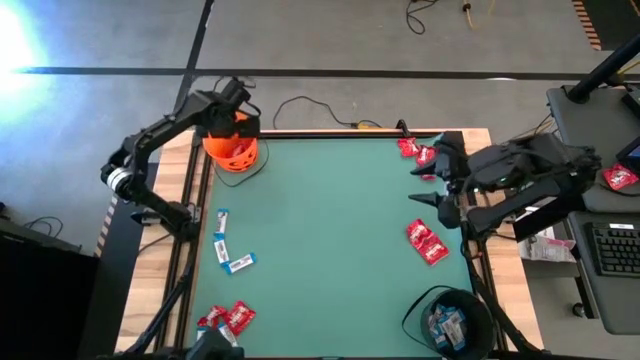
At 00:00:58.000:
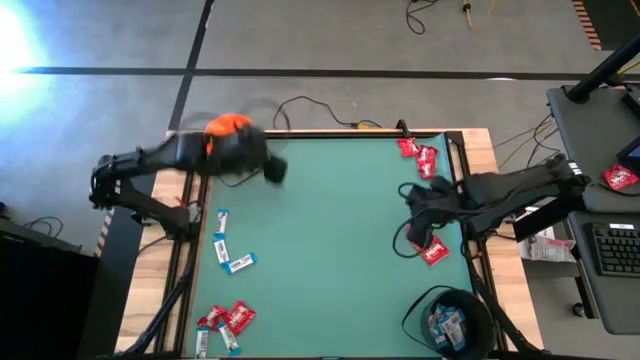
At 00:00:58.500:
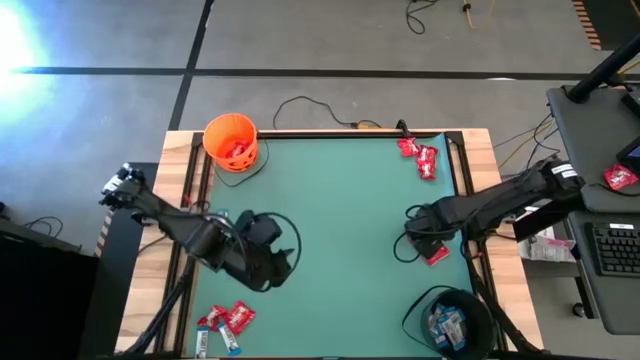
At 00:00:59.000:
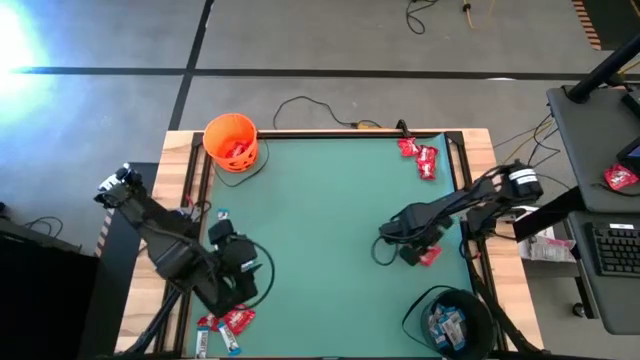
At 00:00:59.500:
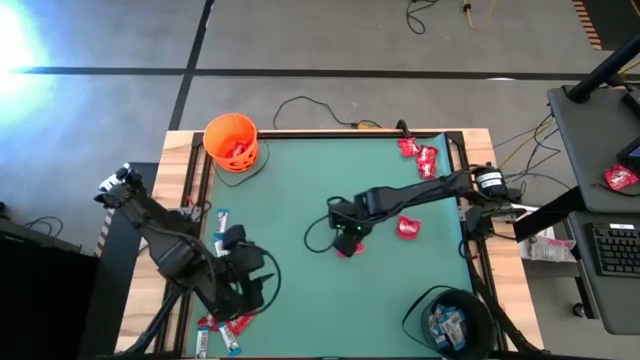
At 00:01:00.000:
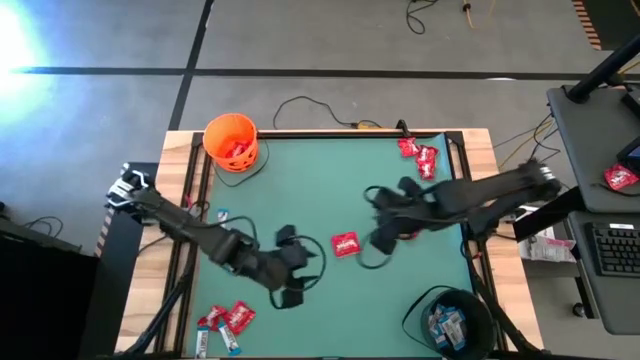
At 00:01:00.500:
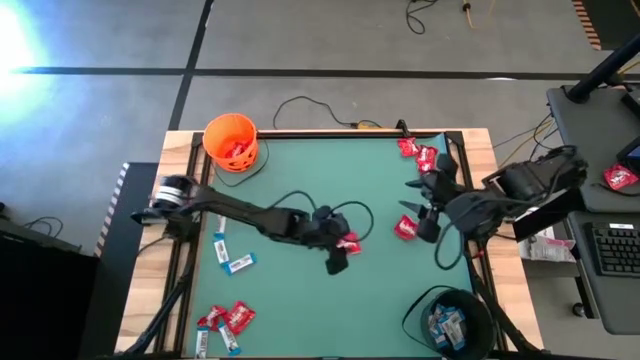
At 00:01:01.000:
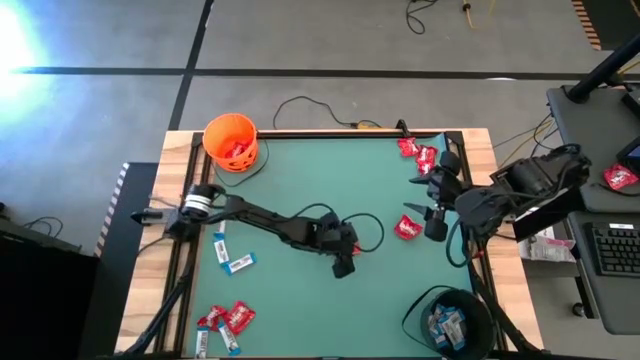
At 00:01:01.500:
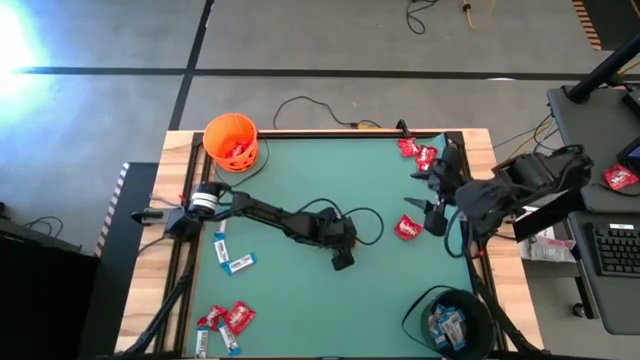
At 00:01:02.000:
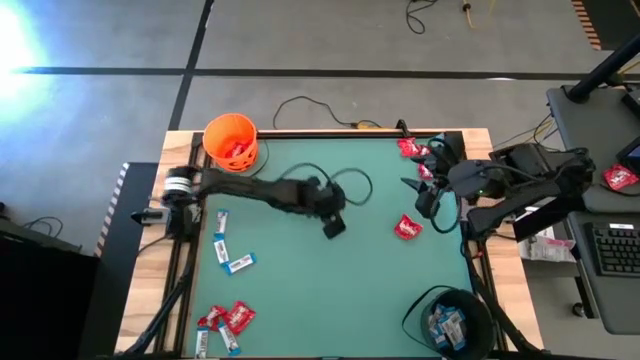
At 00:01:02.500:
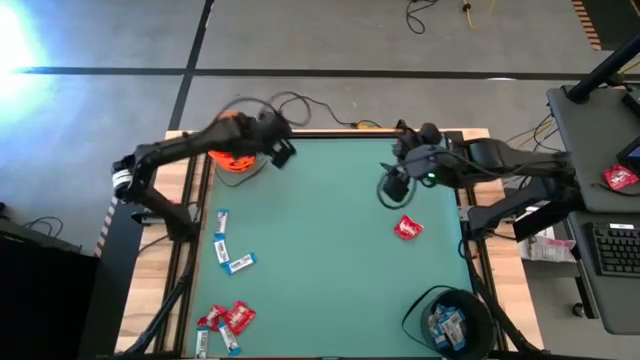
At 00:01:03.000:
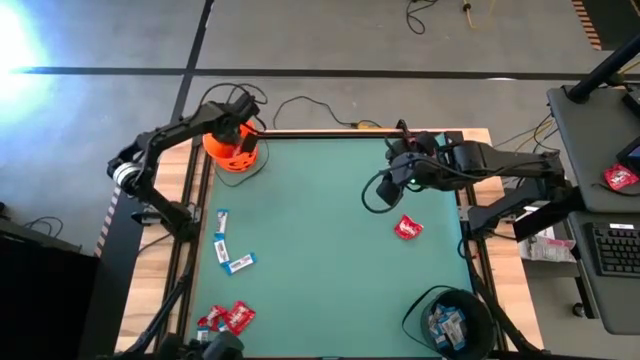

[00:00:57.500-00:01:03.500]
Task: Sort candy by brand, put in halloween buckets
Put the red candy into the orange bucket

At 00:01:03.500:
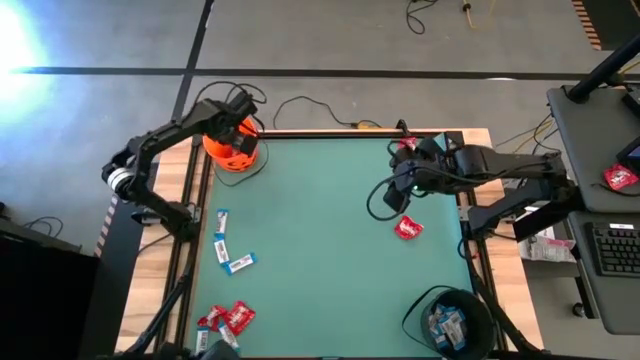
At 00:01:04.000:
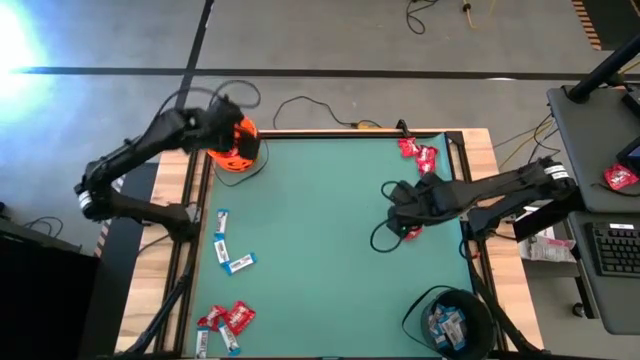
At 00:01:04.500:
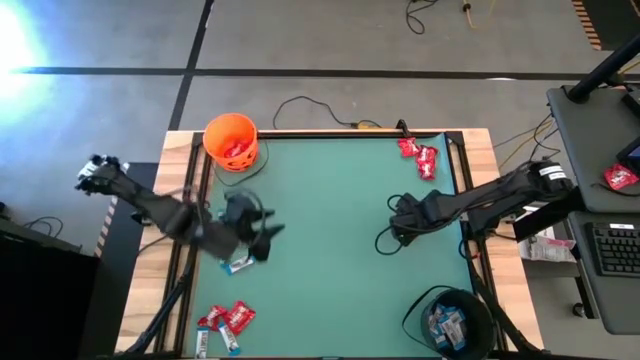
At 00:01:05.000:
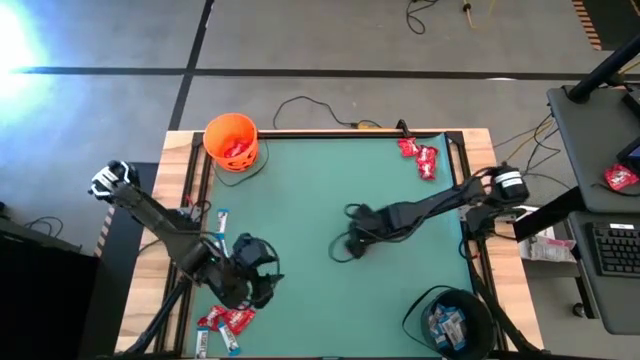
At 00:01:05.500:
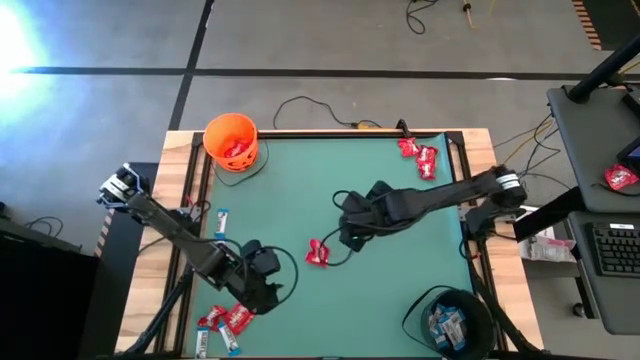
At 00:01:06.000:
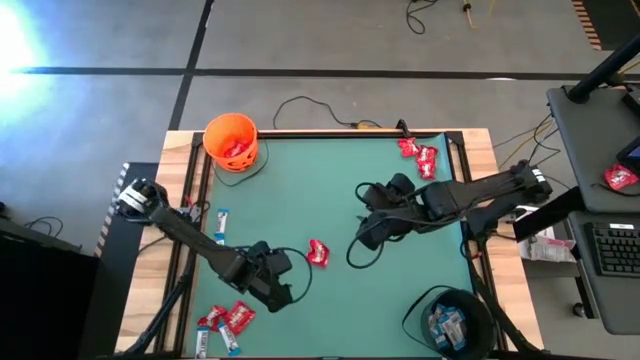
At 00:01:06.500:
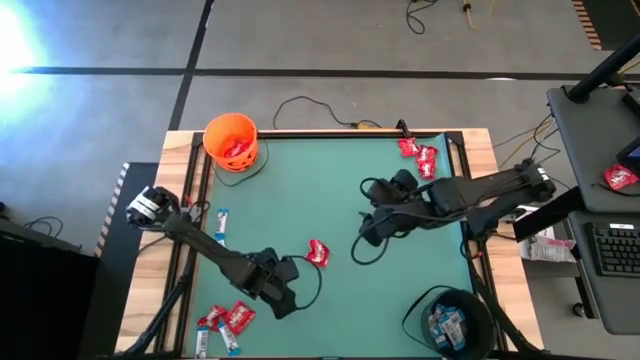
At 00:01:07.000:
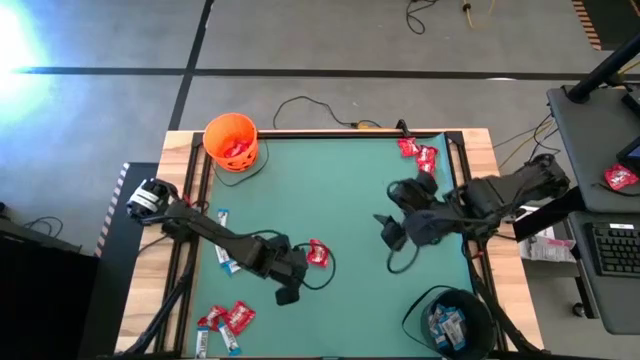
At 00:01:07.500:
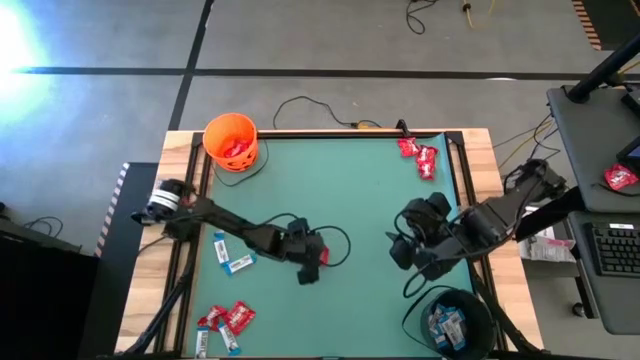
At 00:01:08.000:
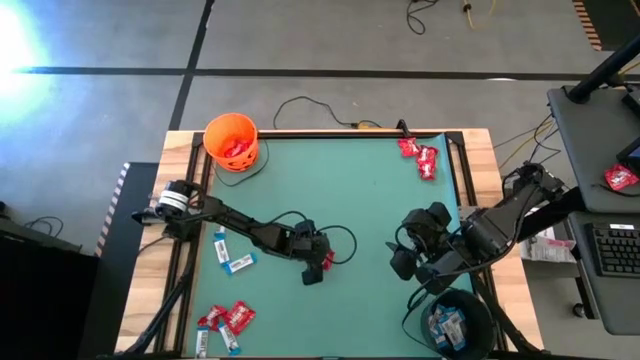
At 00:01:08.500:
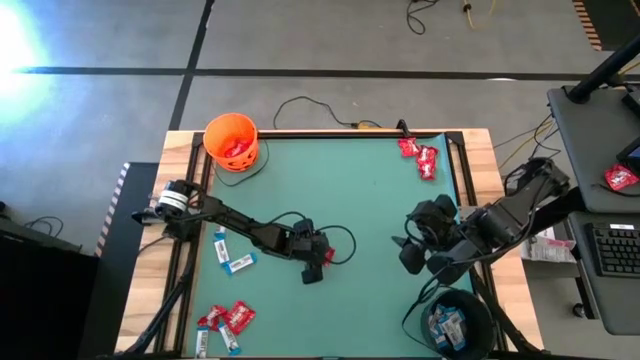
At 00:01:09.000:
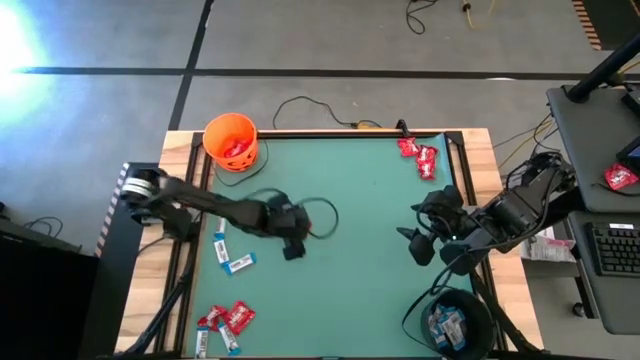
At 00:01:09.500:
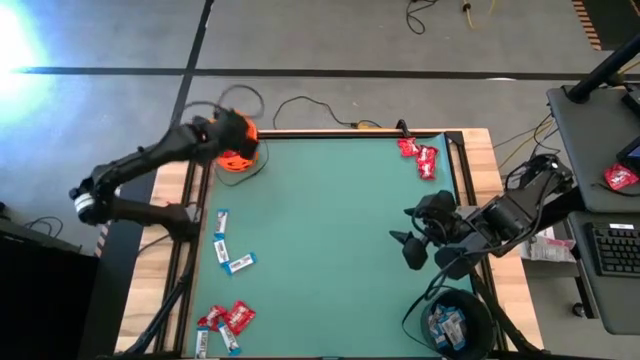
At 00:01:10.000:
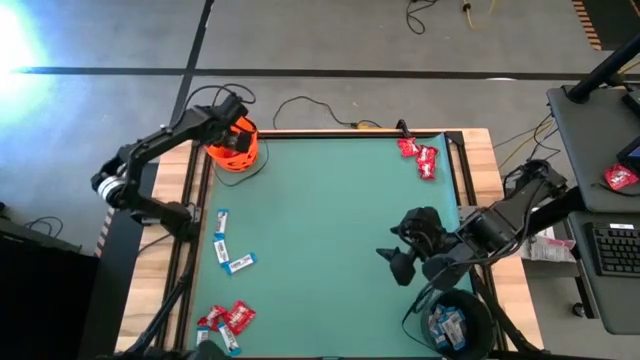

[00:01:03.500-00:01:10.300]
Put the red candy into the orange bucket

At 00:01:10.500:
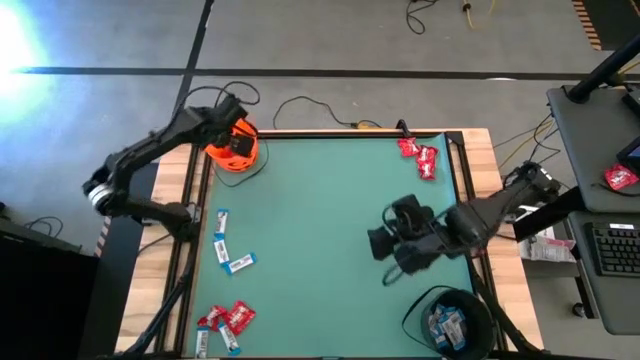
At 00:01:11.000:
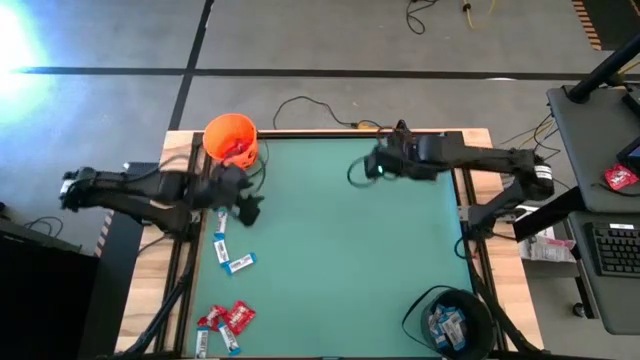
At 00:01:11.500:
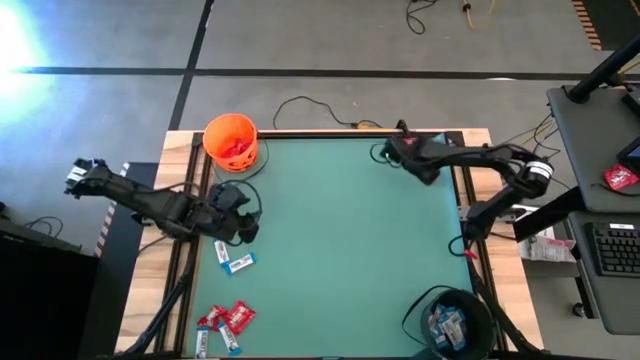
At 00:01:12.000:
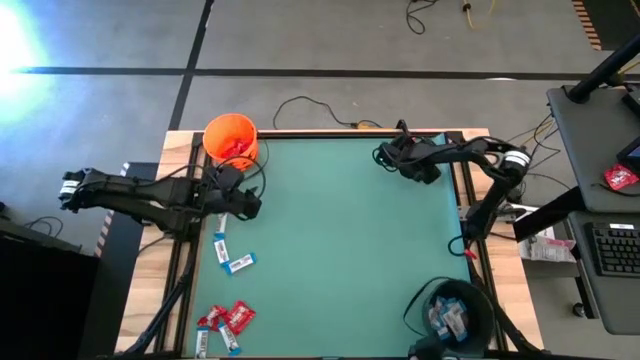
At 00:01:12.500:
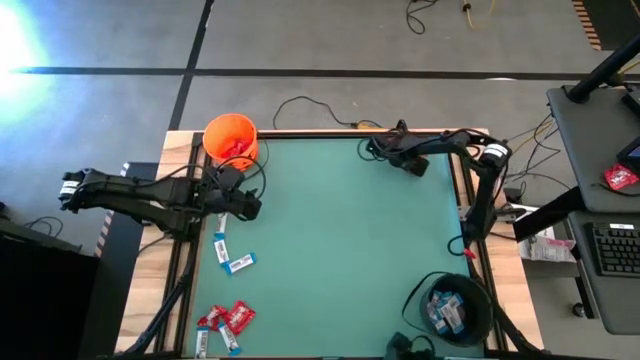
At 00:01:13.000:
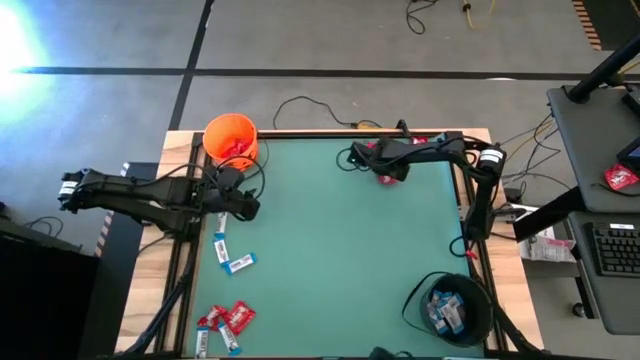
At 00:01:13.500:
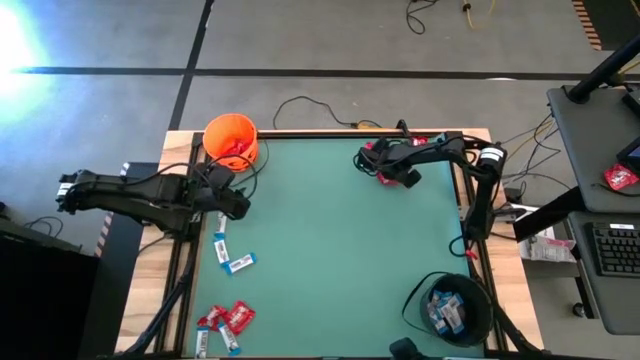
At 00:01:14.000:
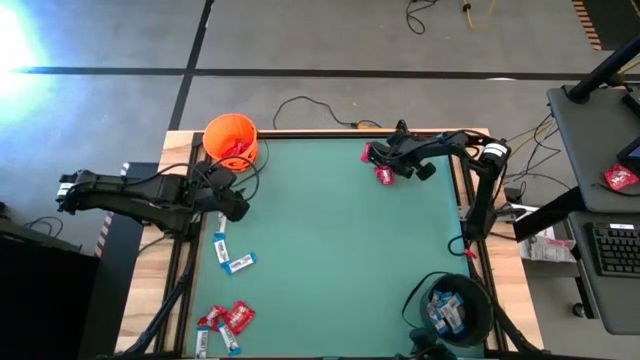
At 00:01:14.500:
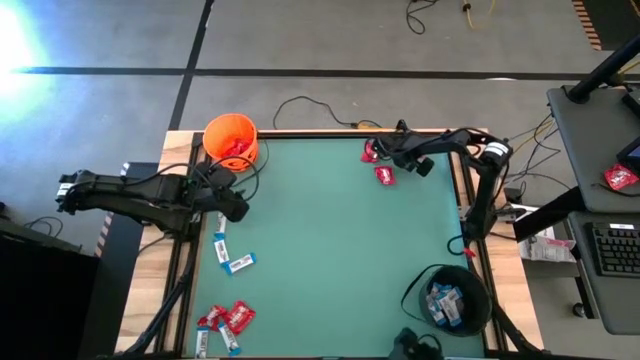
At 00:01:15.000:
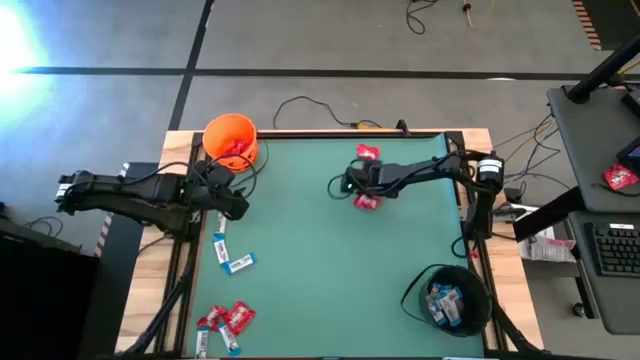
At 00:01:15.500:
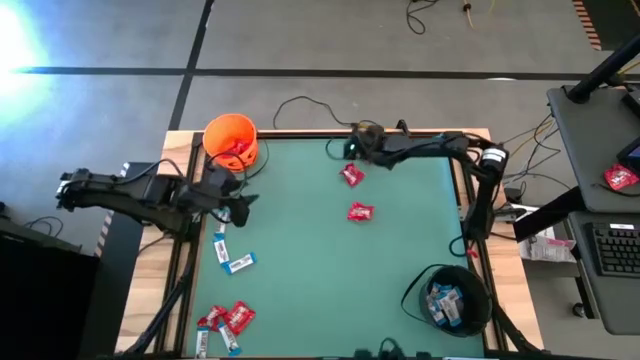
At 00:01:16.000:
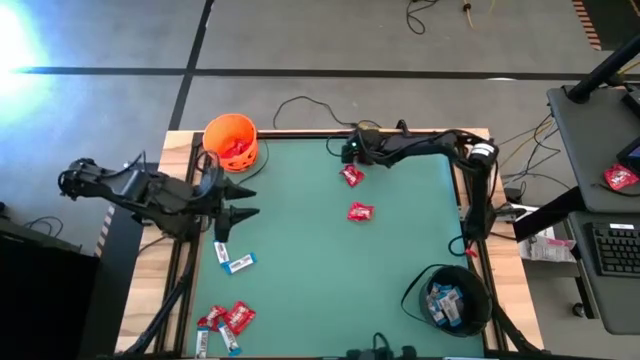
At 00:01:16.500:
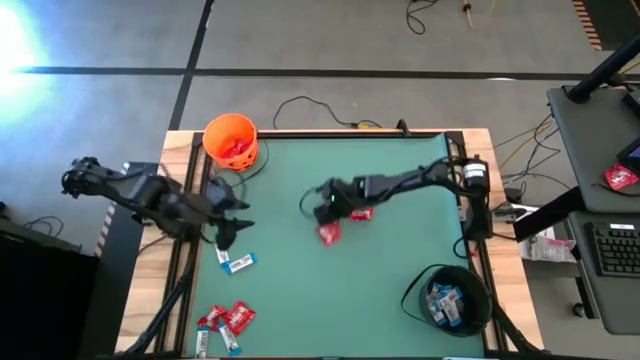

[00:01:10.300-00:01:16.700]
Move the red candies to the center of the table

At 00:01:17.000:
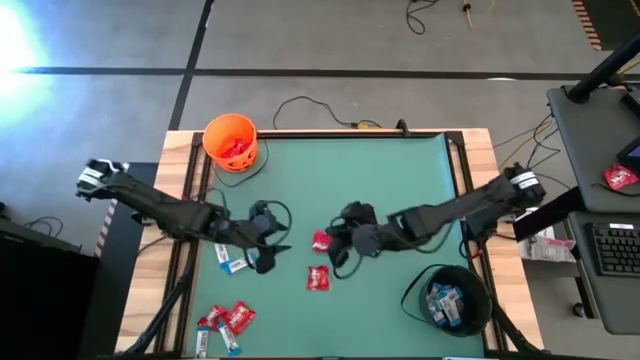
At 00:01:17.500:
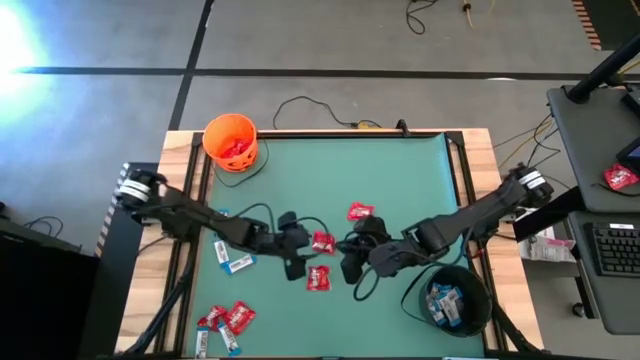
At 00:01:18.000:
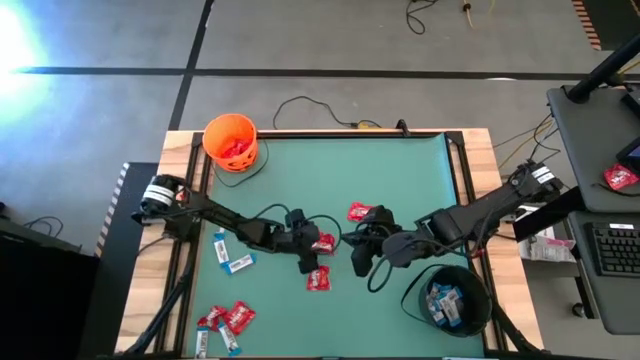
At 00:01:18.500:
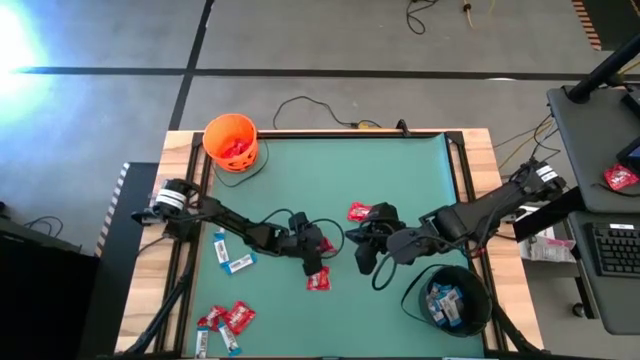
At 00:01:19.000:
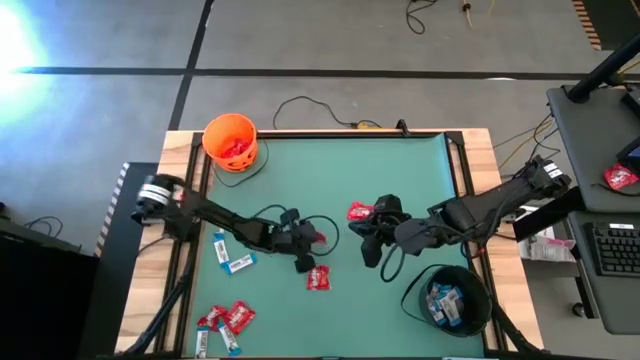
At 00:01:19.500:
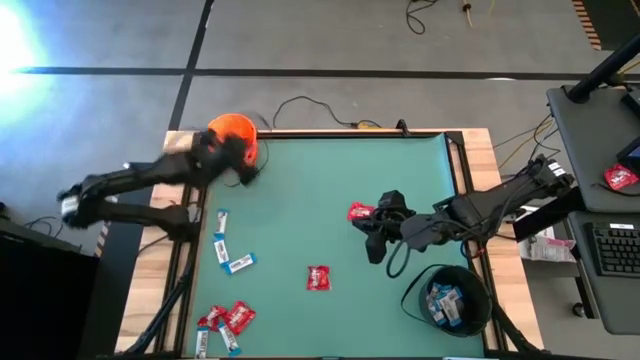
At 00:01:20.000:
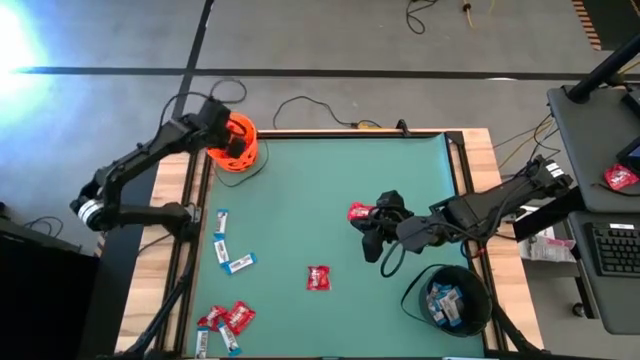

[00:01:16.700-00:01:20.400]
Put the red candy into the orange bucket
